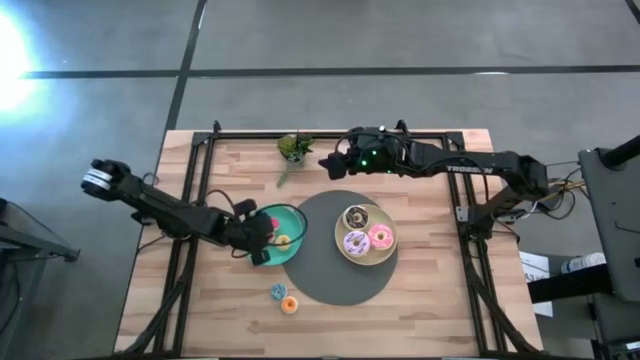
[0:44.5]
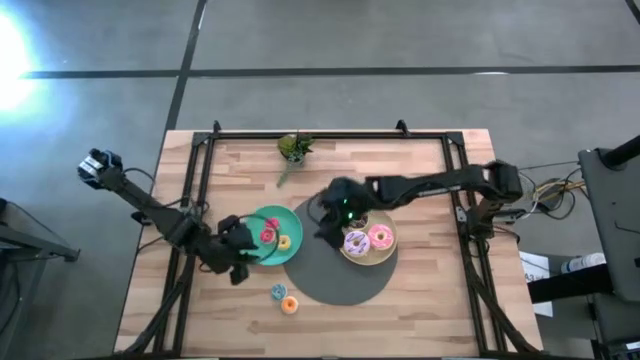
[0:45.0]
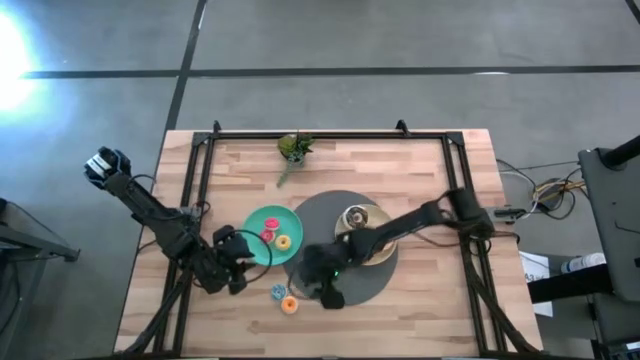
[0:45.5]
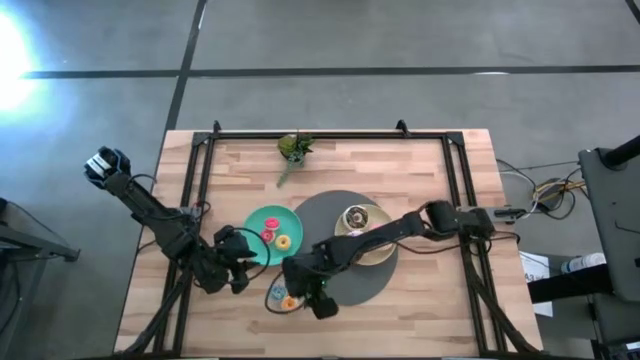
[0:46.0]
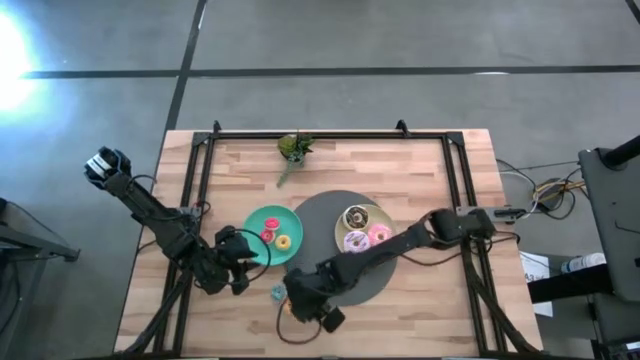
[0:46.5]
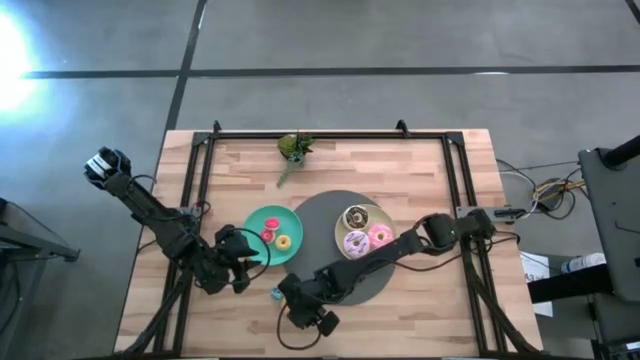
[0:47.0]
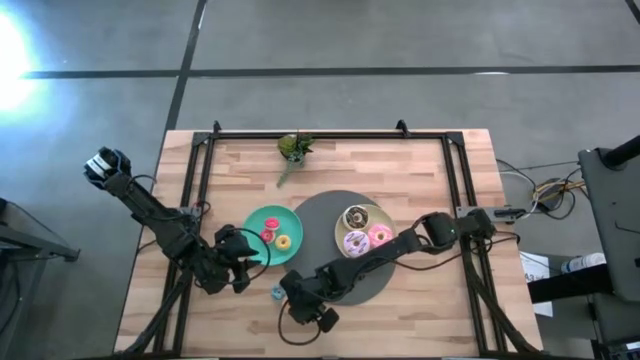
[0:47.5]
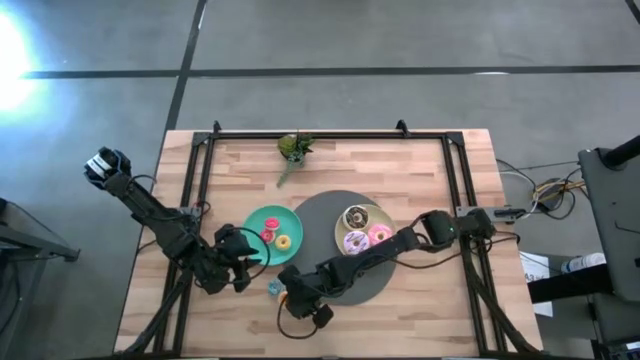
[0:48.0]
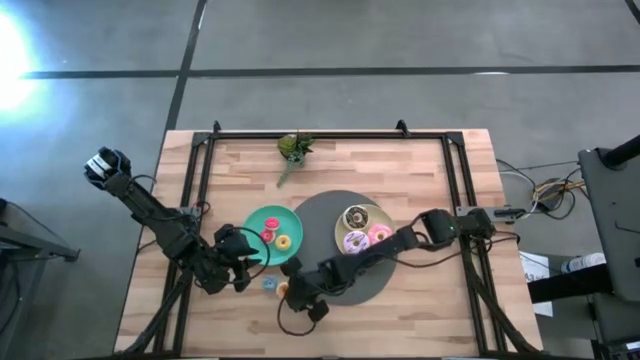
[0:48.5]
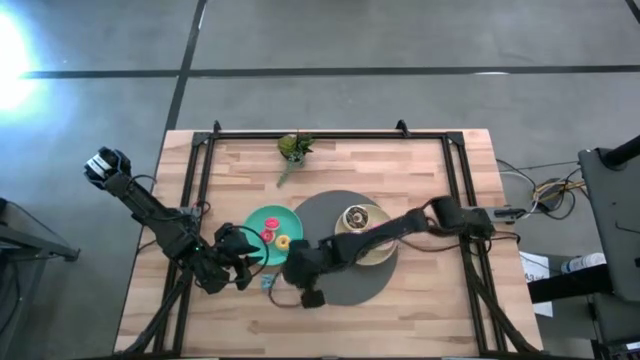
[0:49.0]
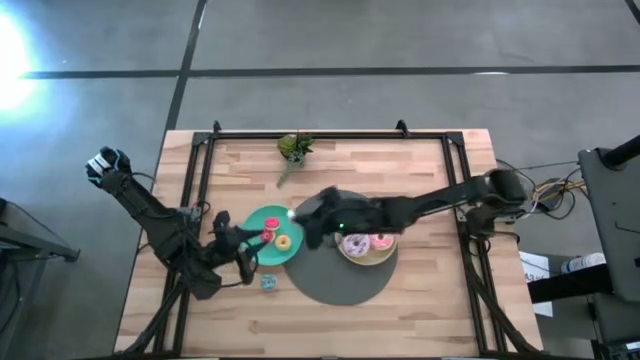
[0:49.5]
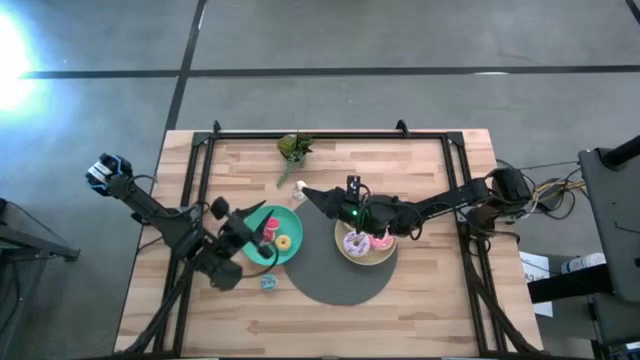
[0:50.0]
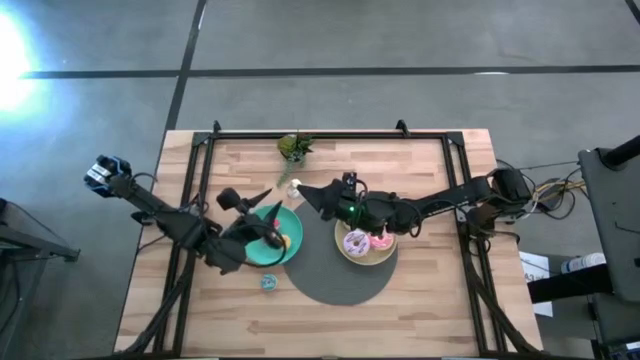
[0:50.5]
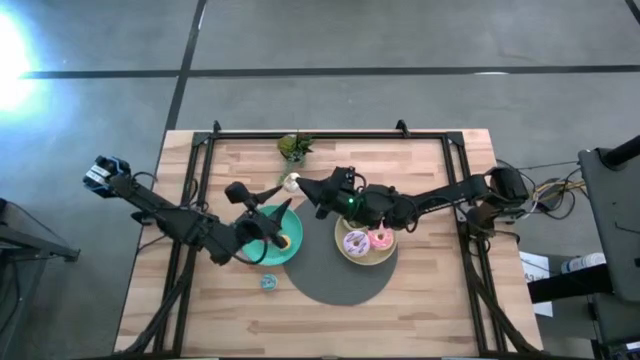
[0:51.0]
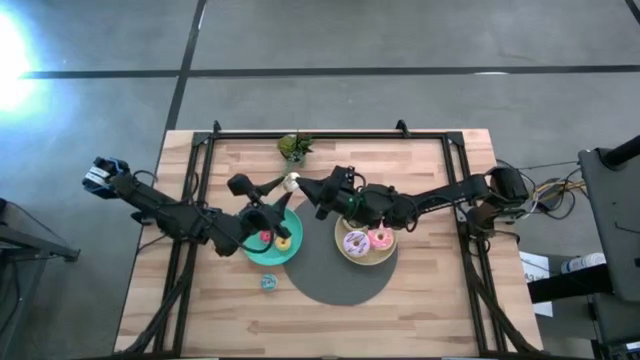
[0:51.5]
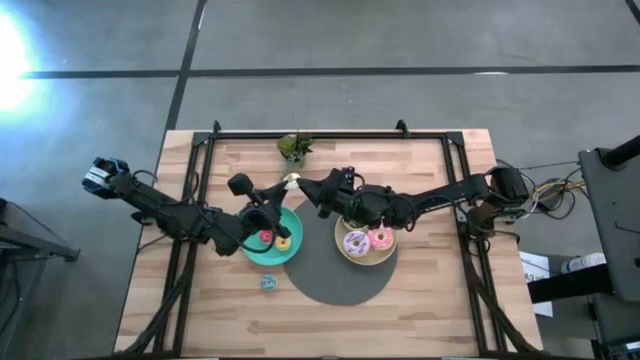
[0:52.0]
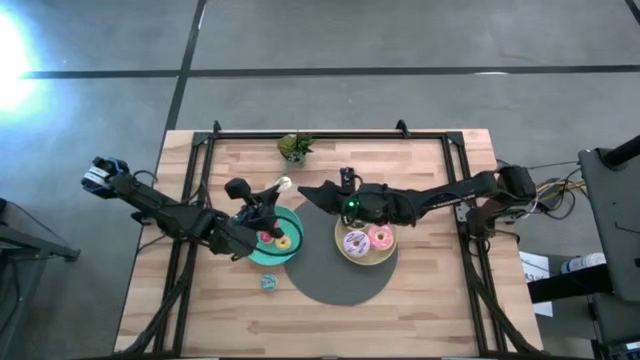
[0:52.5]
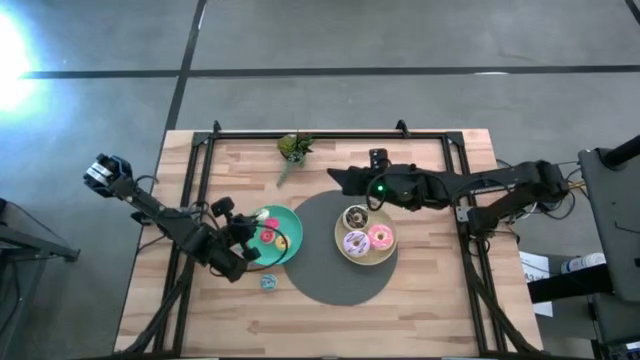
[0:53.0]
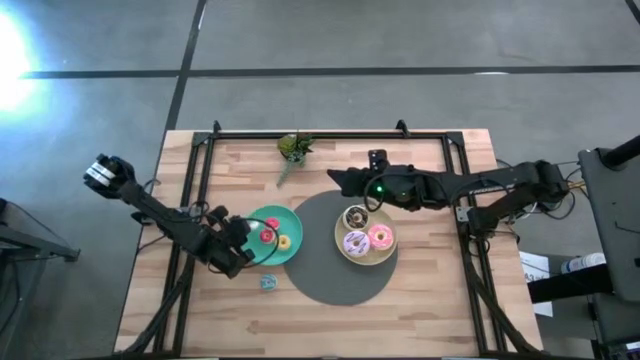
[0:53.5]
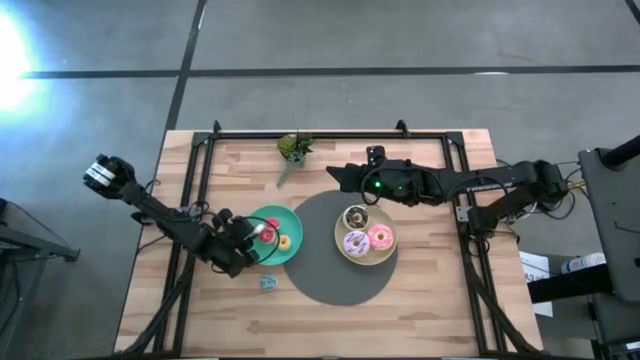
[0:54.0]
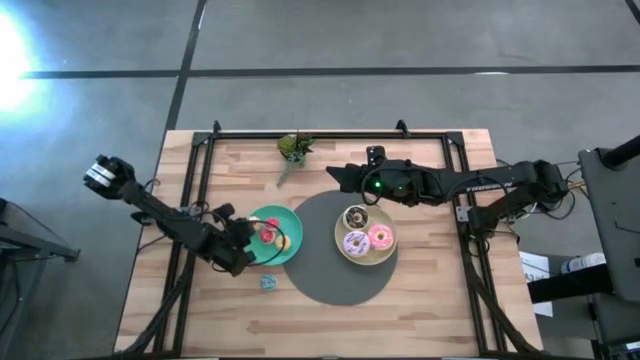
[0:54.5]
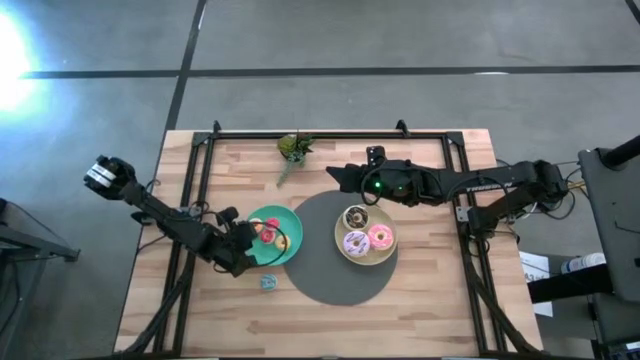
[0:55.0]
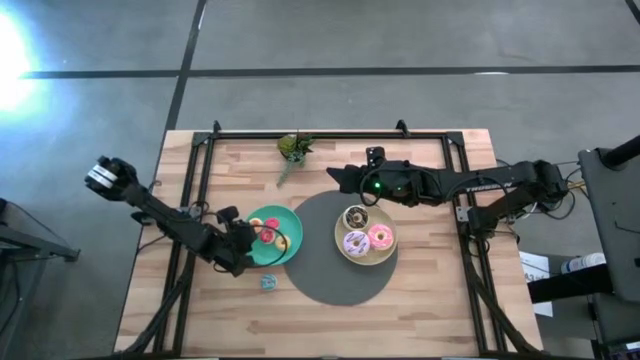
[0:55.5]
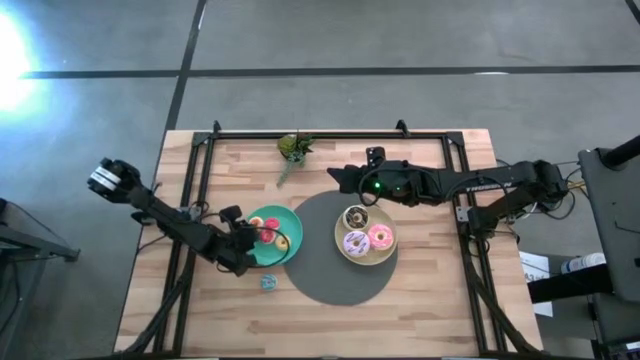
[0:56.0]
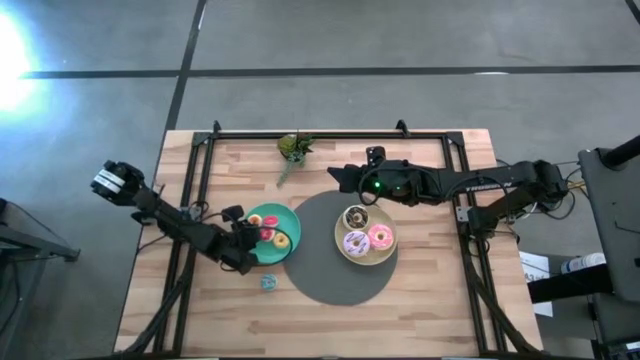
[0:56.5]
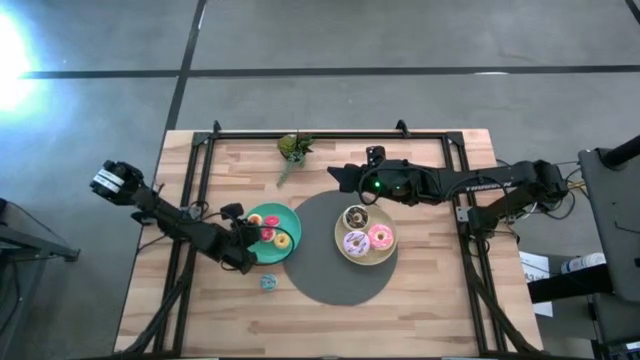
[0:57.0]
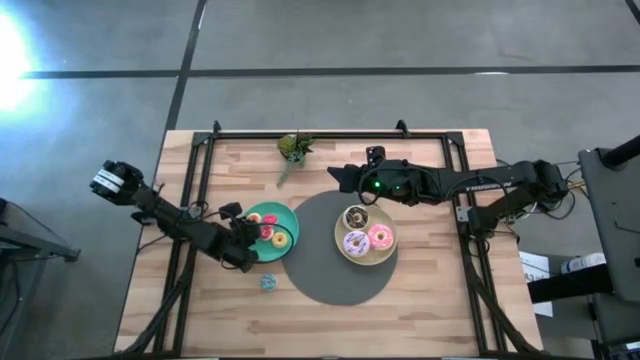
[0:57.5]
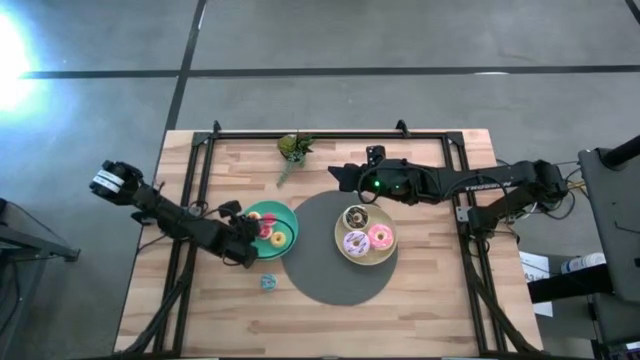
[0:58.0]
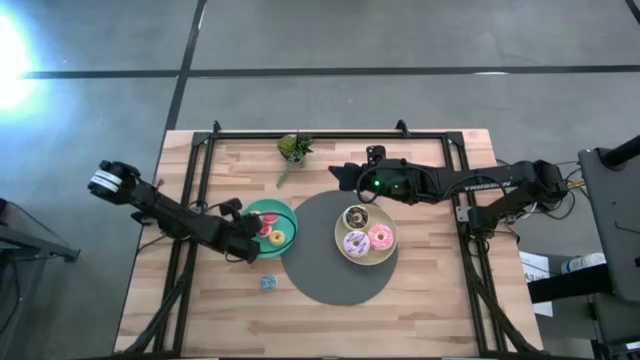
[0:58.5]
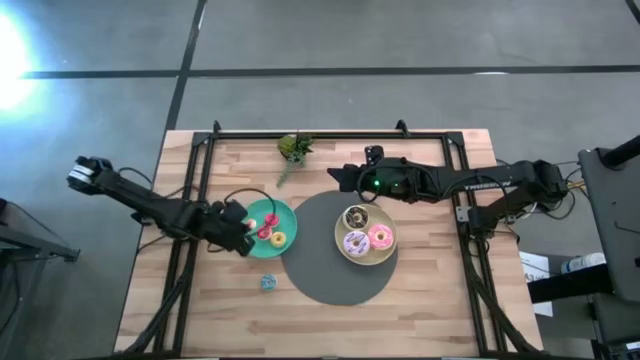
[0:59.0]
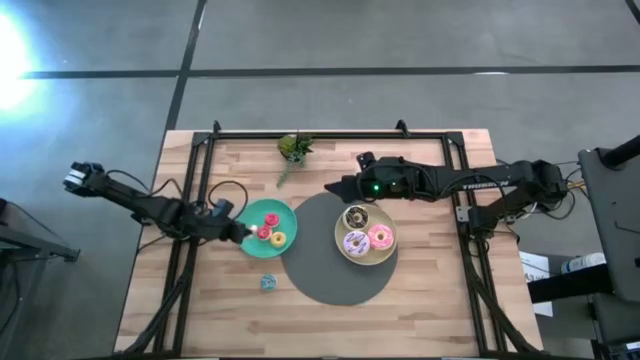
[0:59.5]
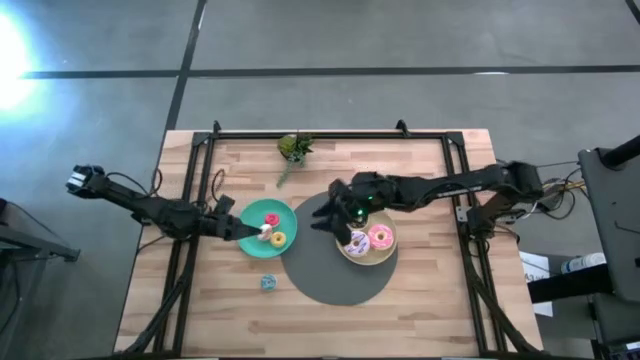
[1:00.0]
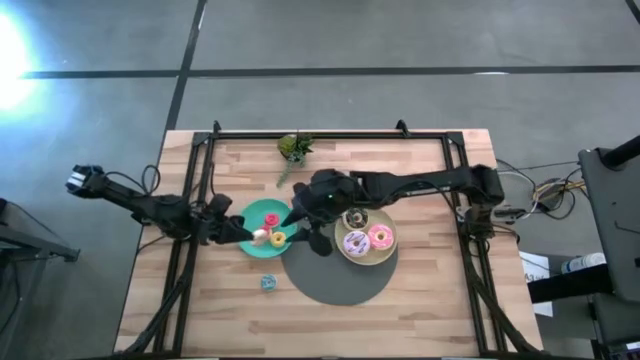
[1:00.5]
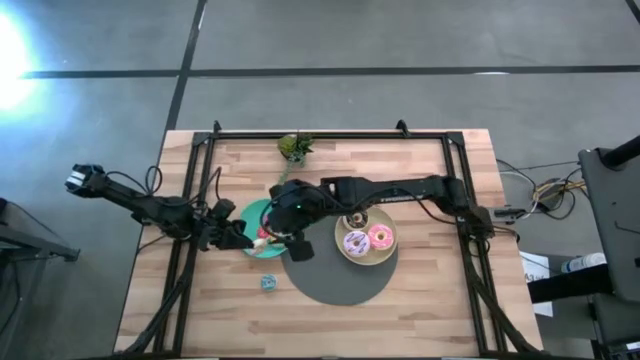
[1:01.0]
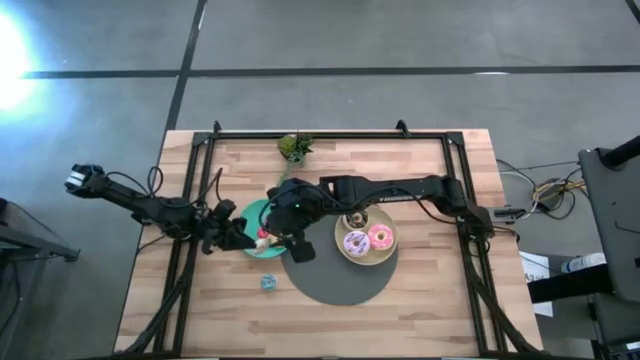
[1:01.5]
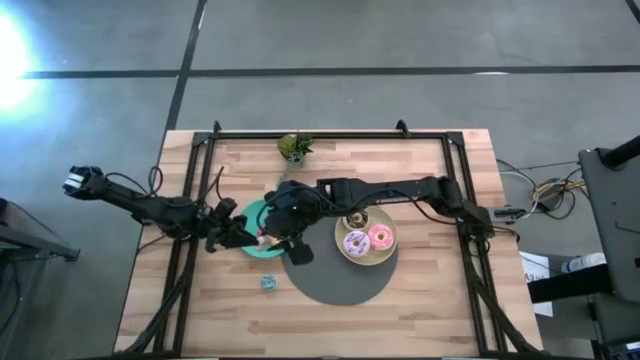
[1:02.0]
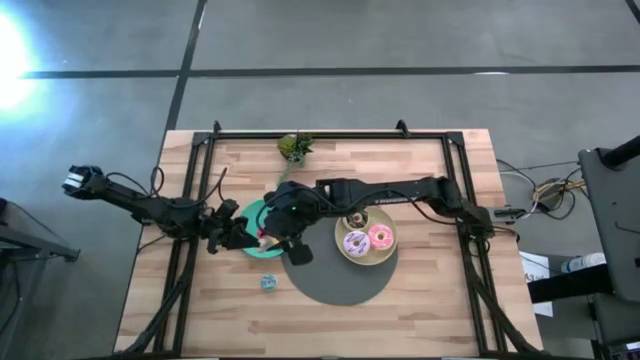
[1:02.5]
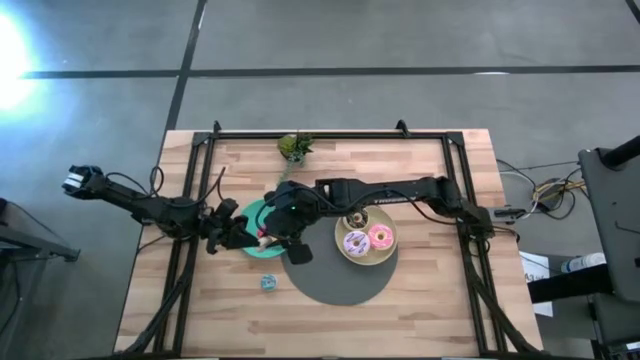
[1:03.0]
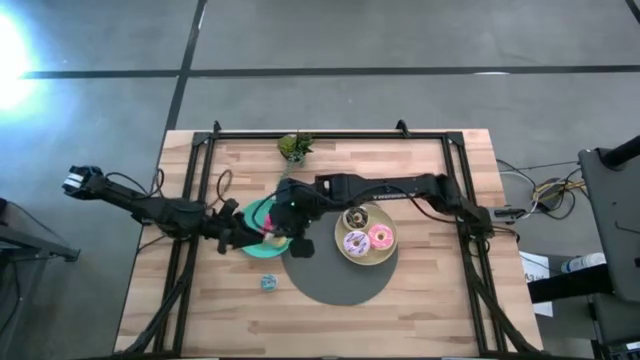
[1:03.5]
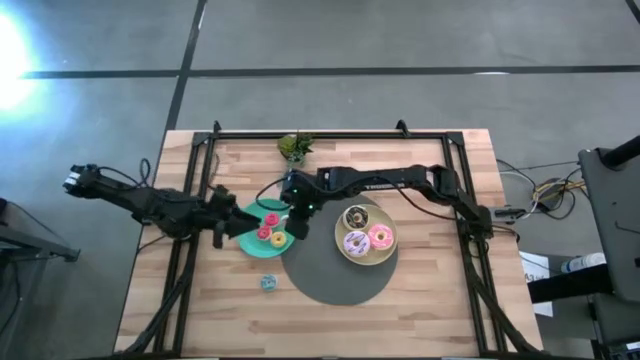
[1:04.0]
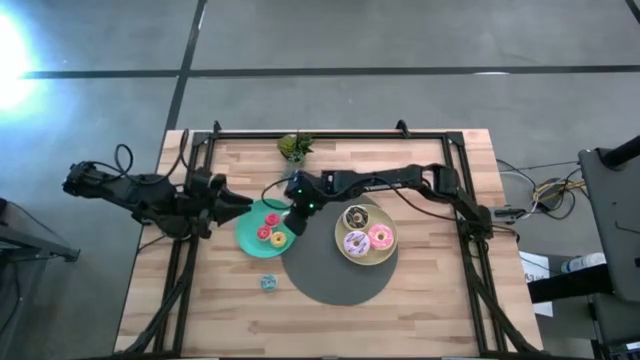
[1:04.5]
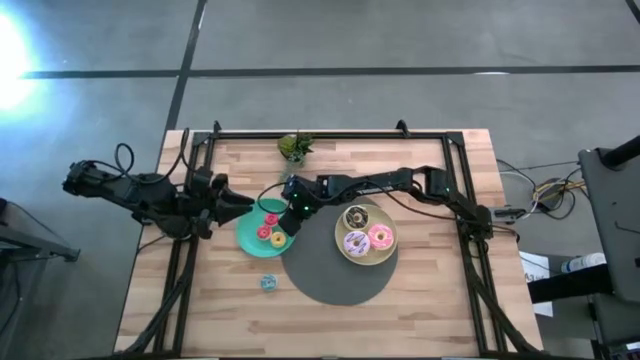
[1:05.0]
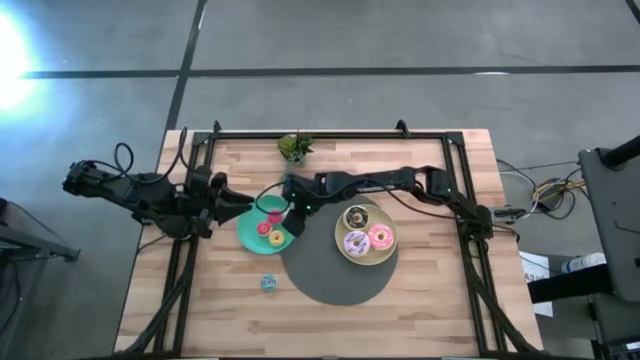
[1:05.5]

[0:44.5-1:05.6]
Task: Pick & Place donuts
Put the white doughnut on the green plate
